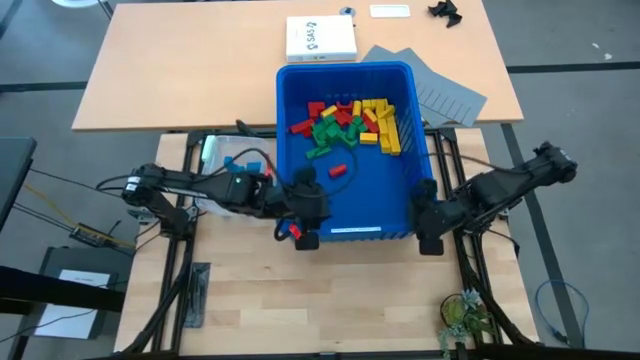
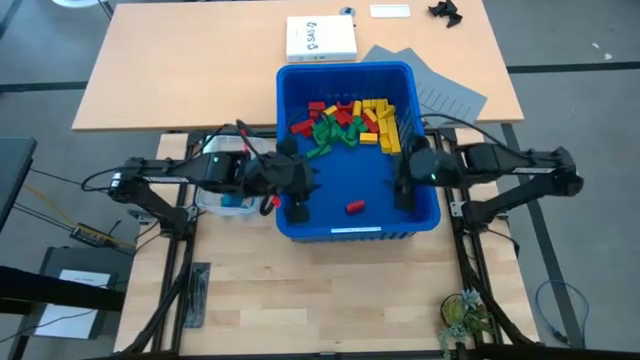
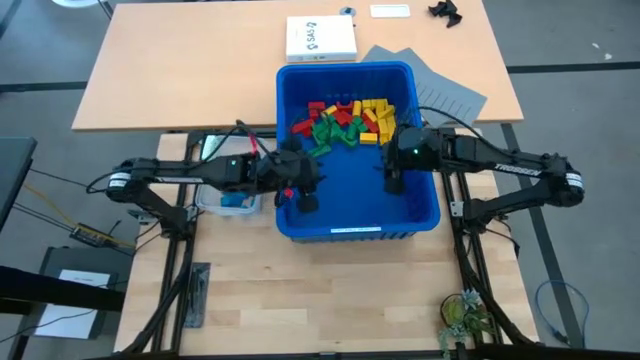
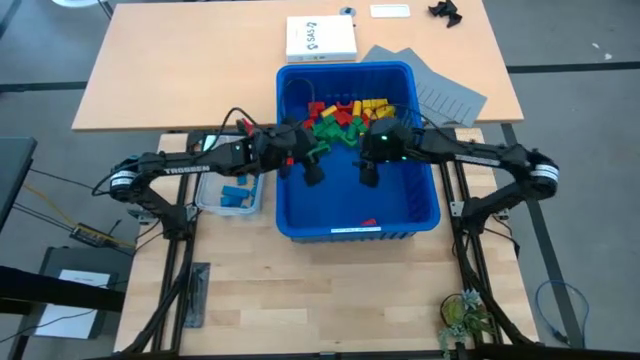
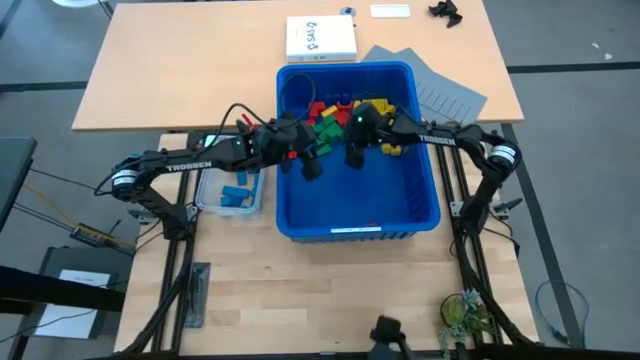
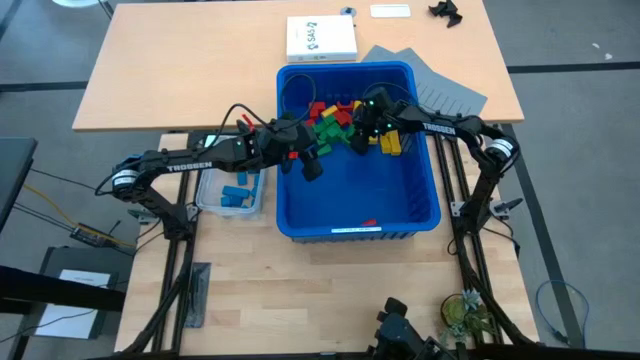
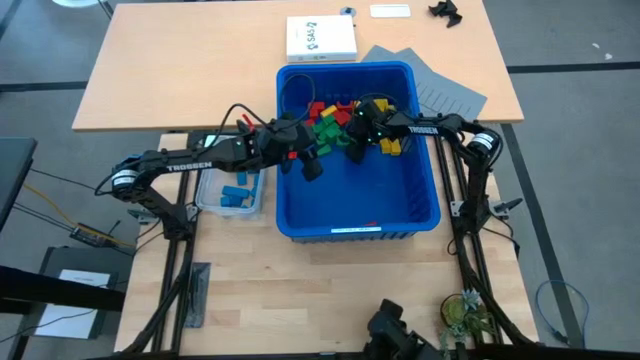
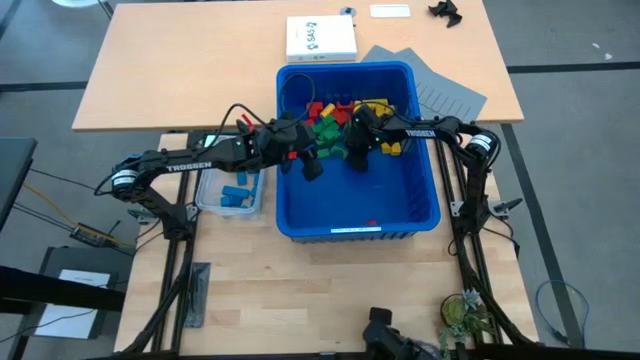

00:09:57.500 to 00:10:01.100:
Task: Sort blocks
Put the green block into the transparent bin

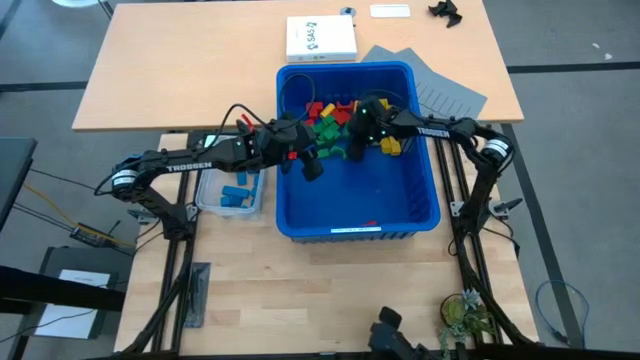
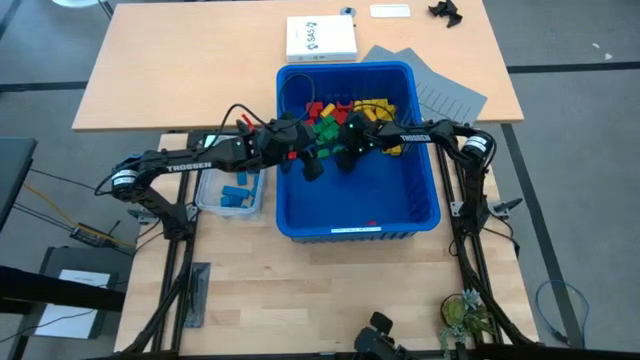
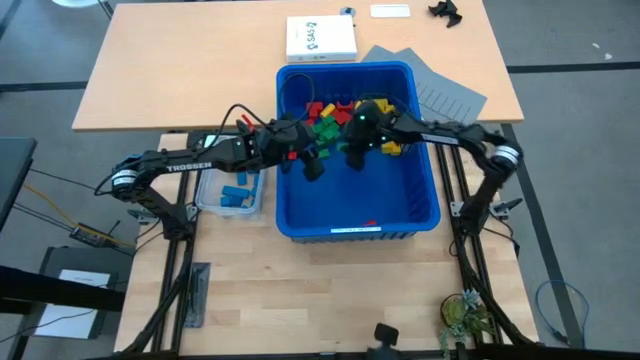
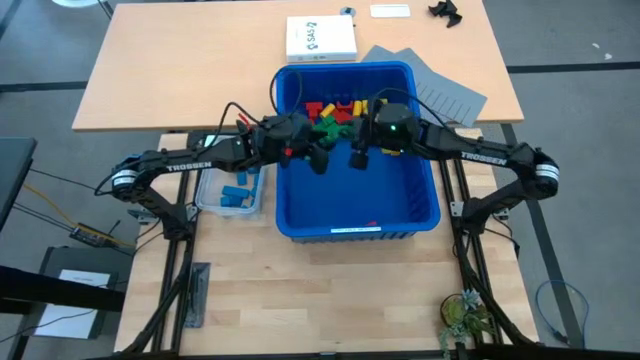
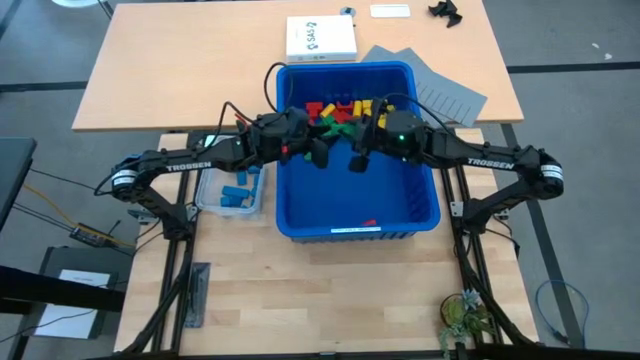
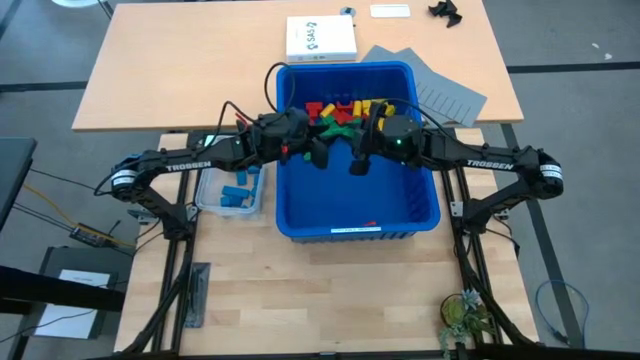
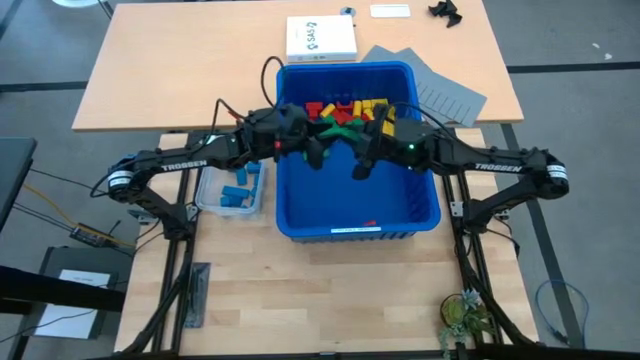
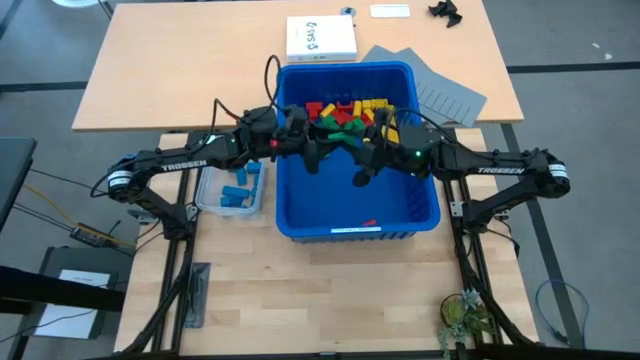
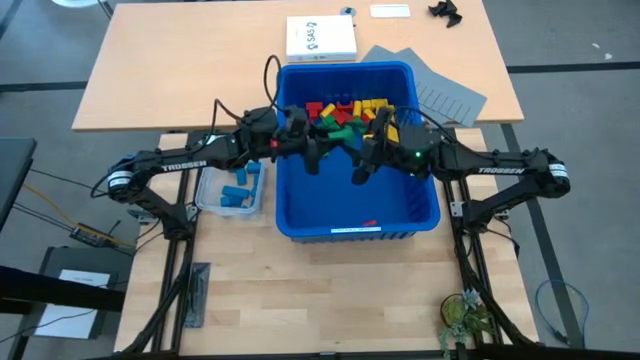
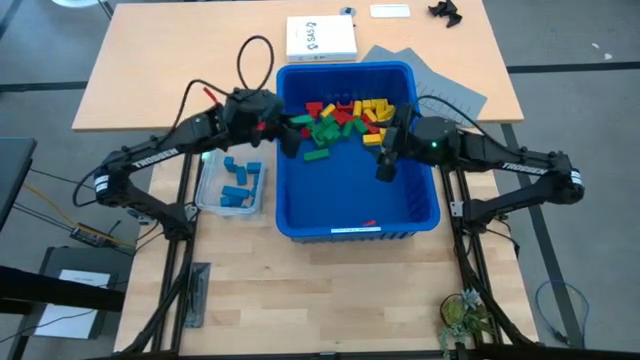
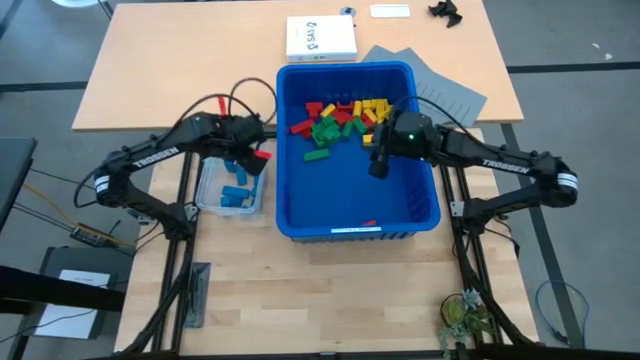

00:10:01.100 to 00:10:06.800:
Put the green block into the transparent bin

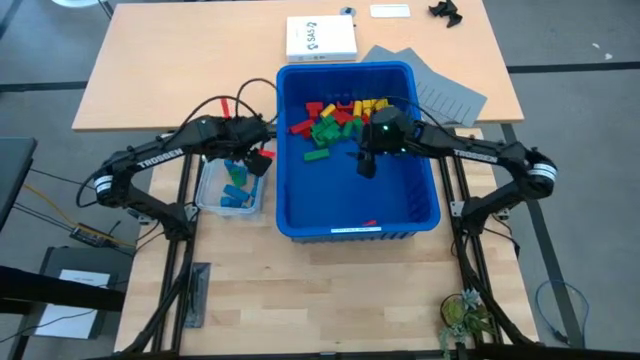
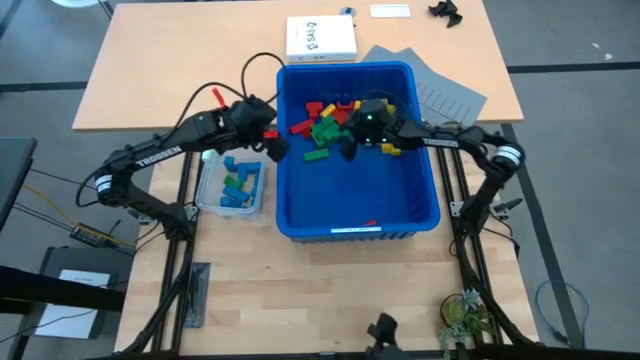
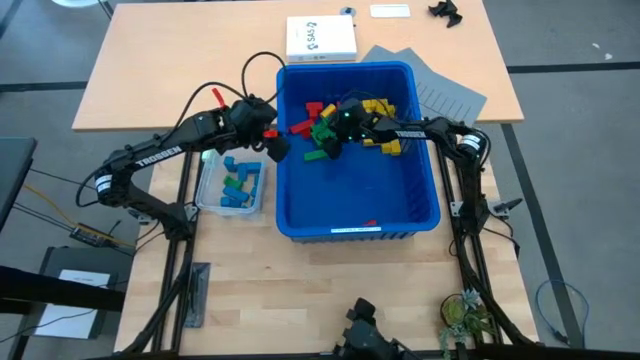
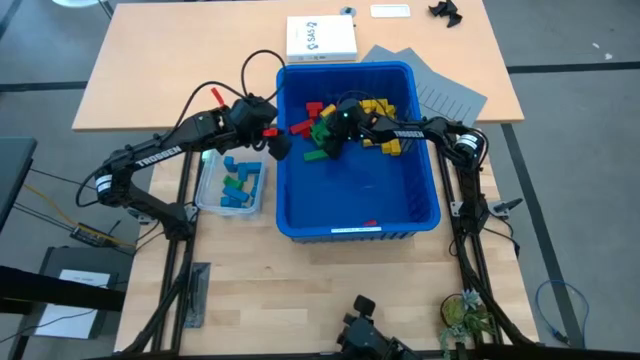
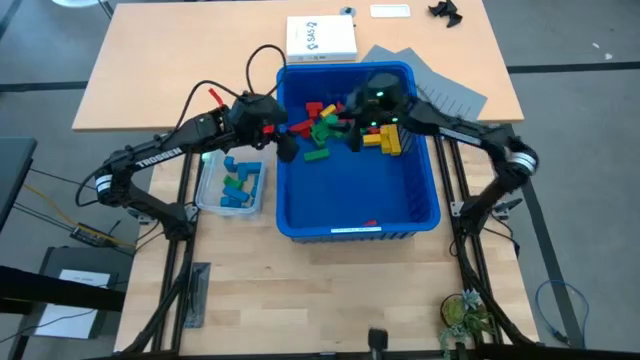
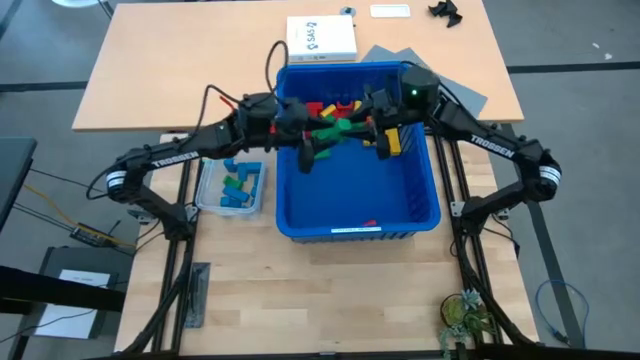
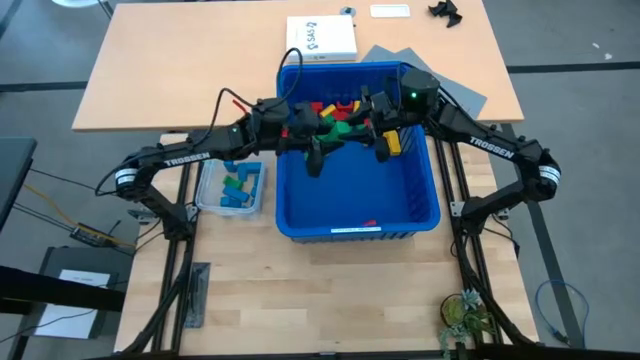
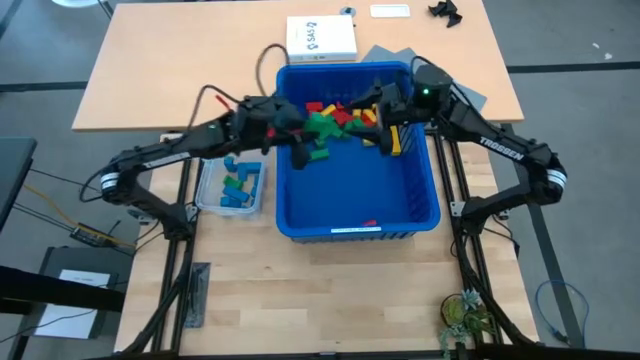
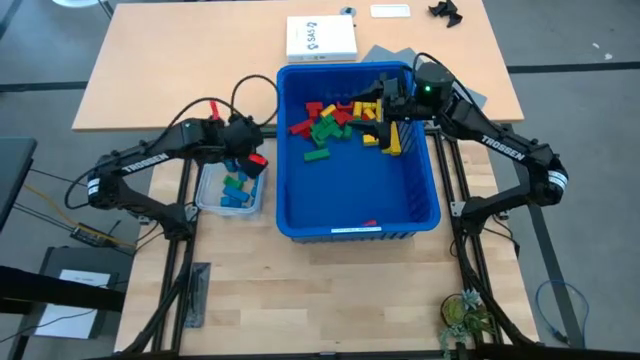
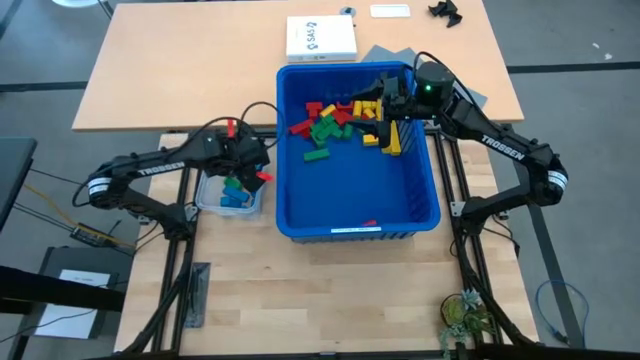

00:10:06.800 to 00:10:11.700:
Put the green block into the transparent bin

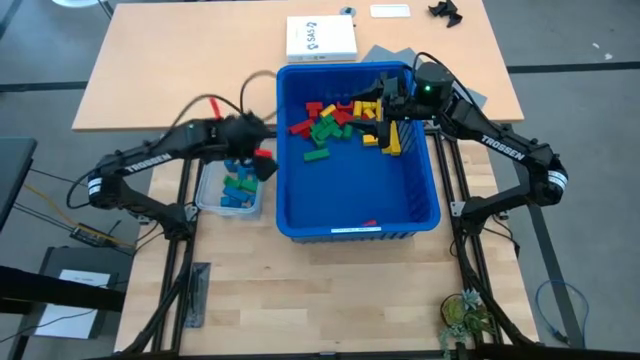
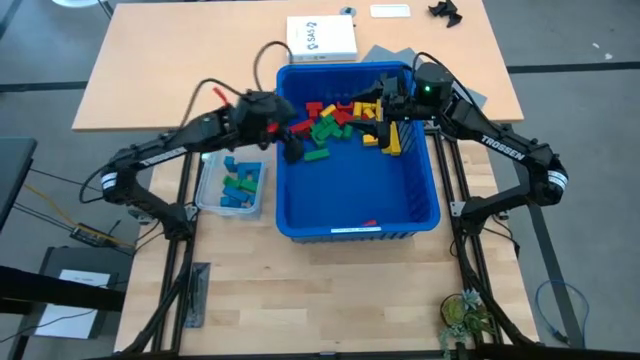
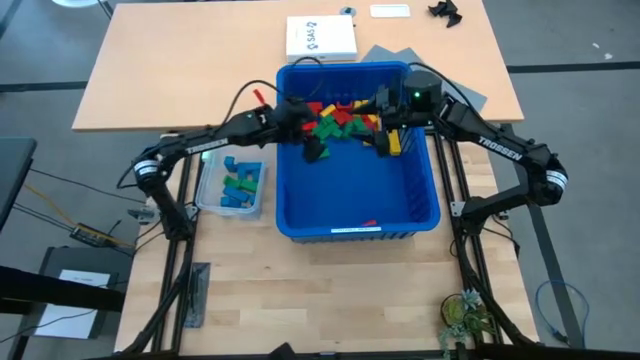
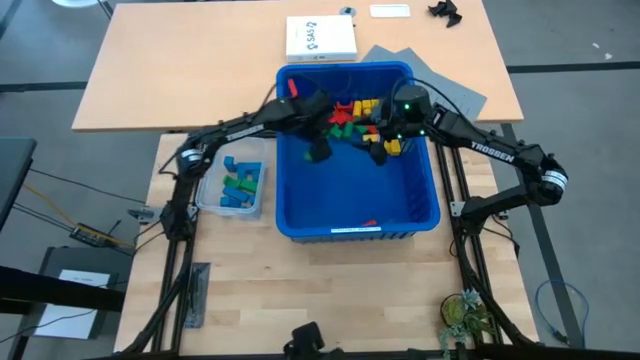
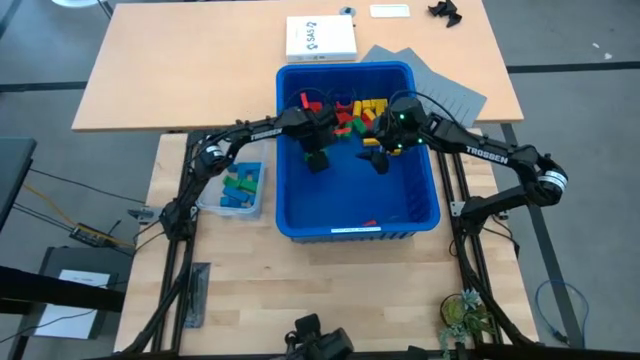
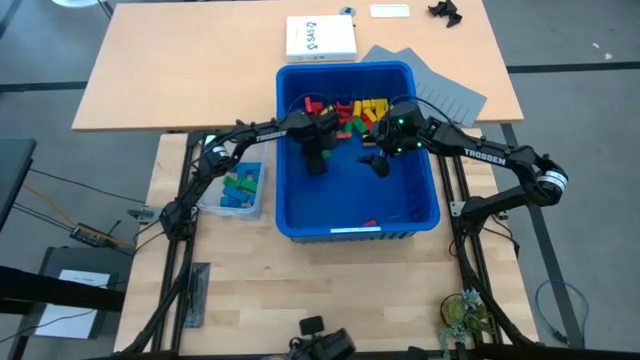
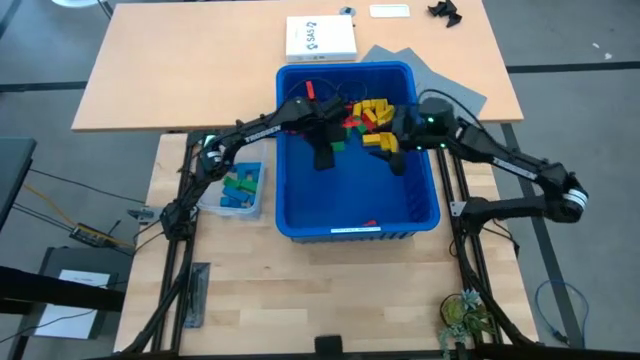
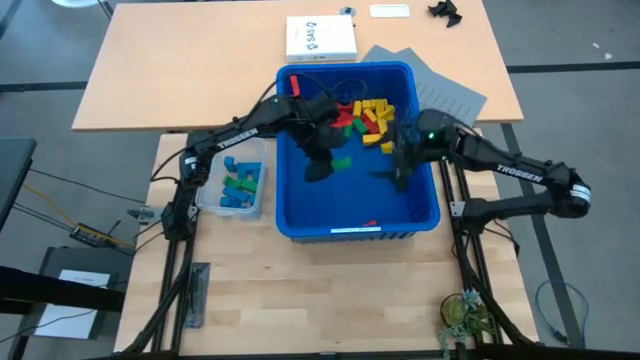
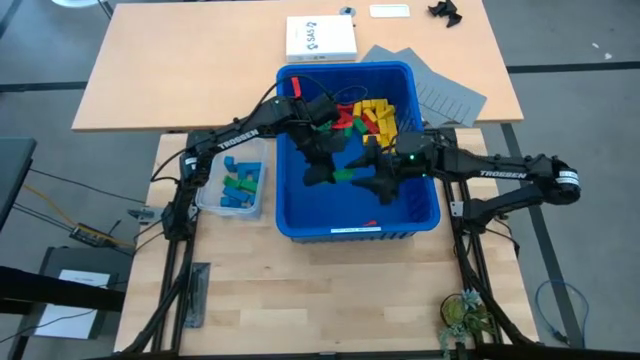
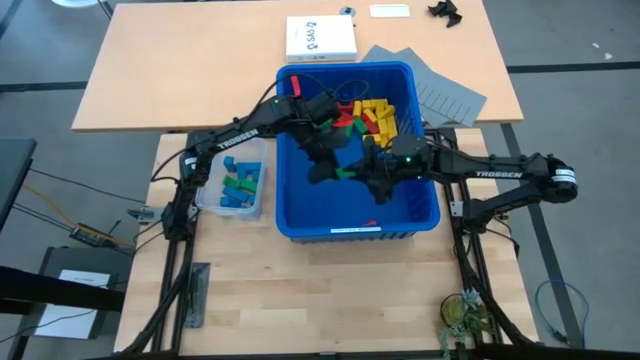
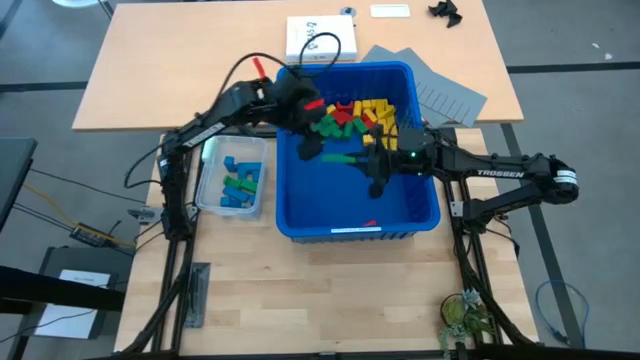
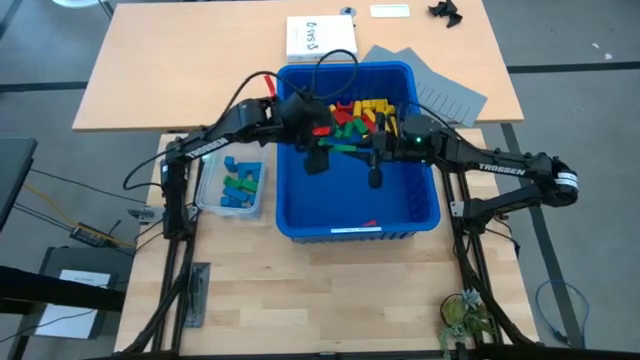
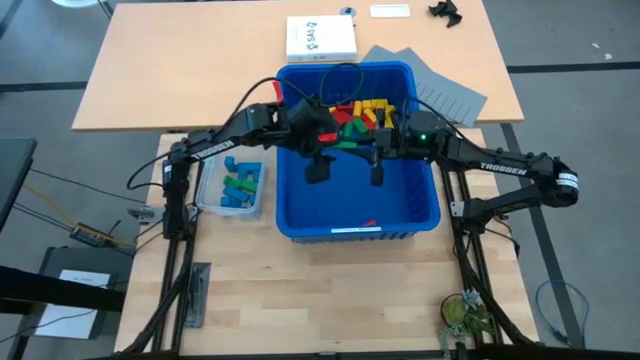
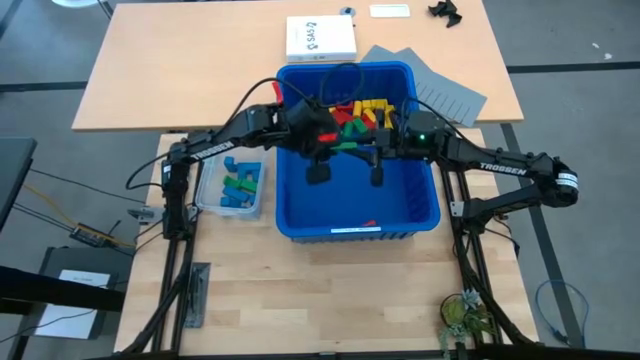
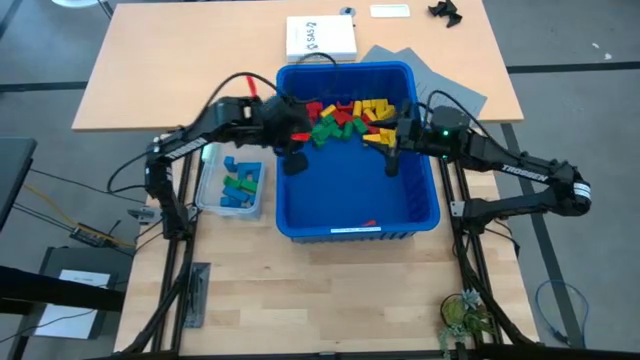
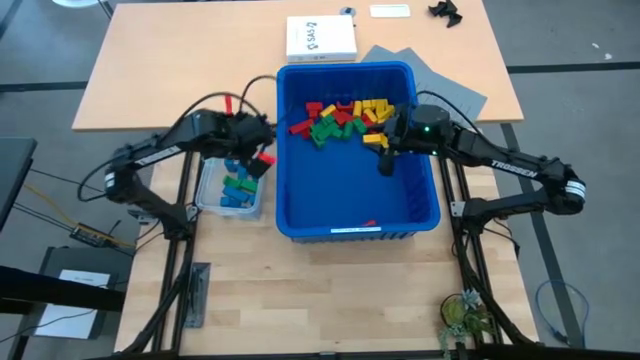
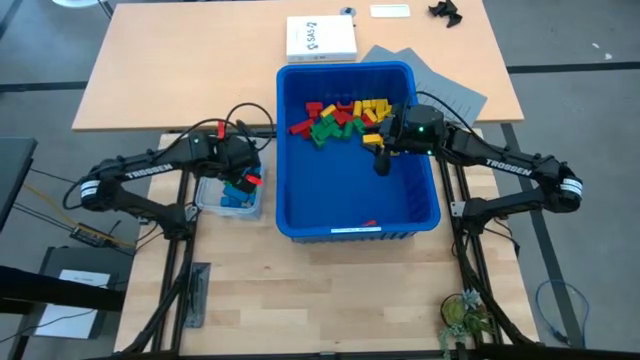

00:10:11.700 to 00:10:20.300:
Put the green block into the transparent bin
